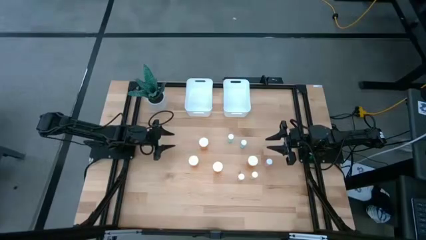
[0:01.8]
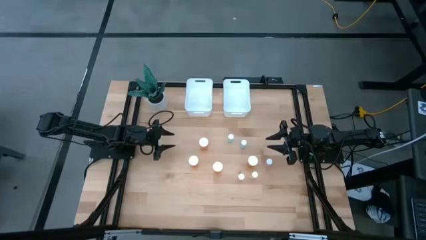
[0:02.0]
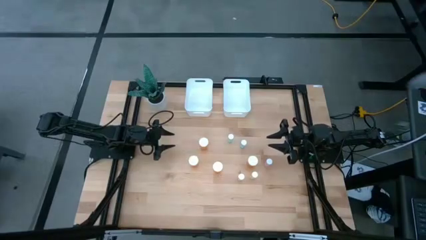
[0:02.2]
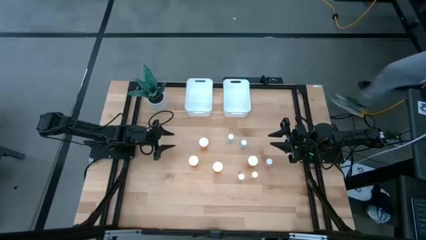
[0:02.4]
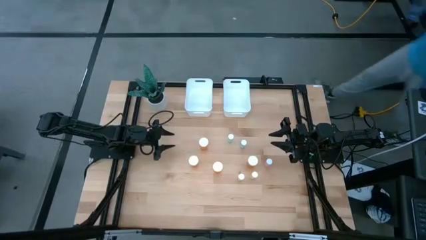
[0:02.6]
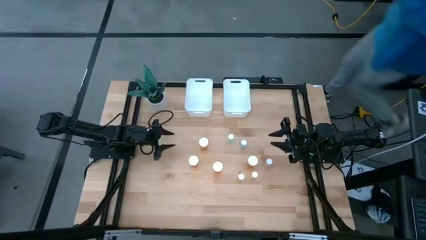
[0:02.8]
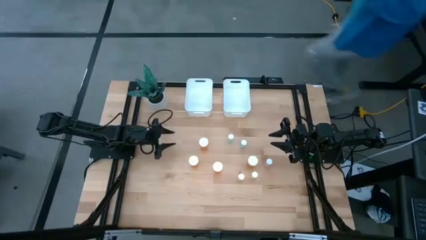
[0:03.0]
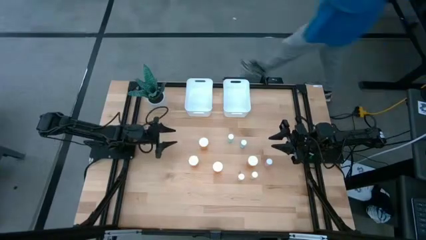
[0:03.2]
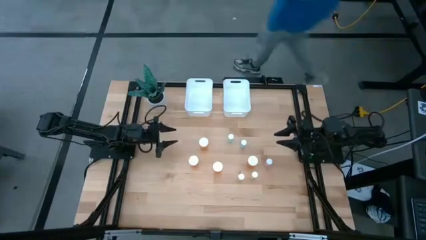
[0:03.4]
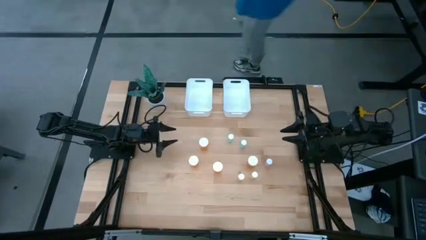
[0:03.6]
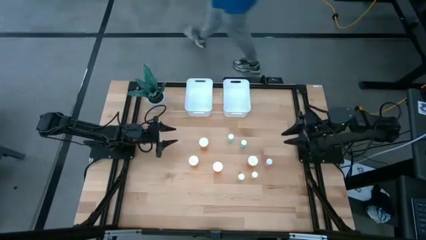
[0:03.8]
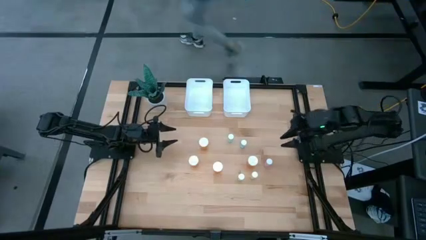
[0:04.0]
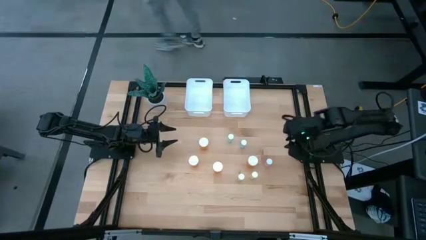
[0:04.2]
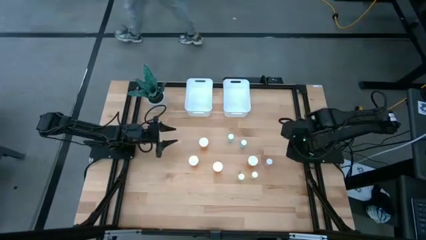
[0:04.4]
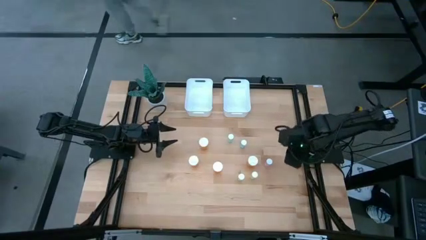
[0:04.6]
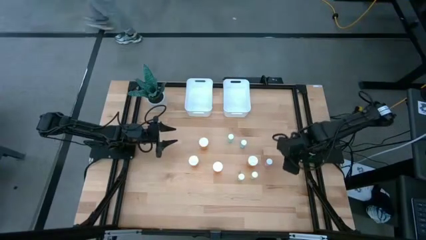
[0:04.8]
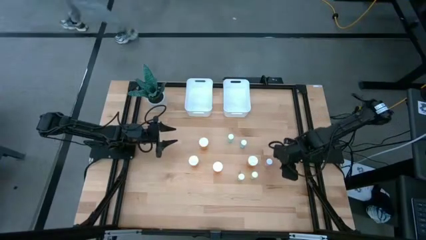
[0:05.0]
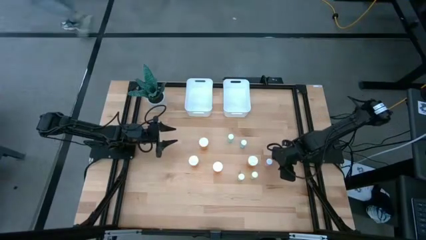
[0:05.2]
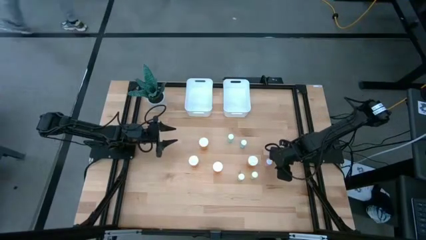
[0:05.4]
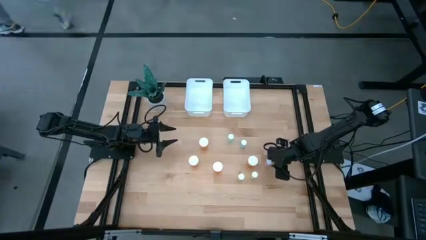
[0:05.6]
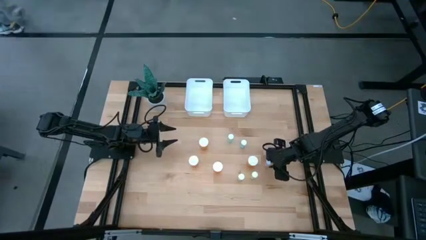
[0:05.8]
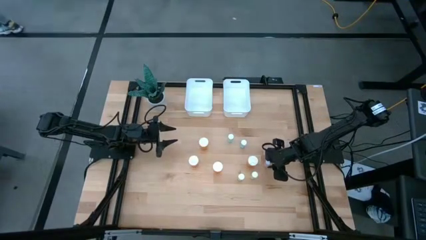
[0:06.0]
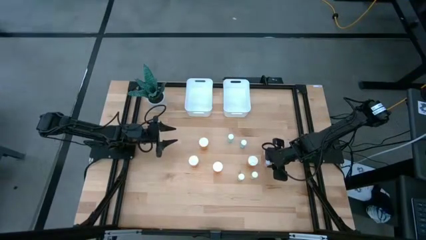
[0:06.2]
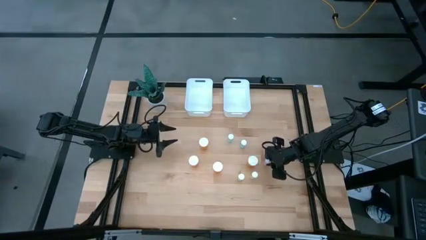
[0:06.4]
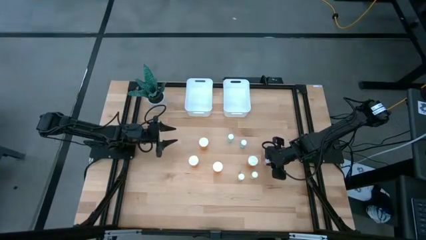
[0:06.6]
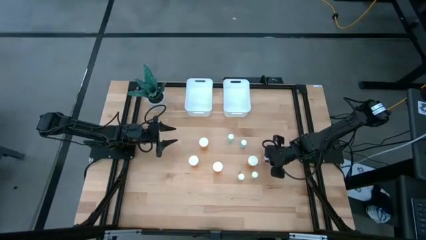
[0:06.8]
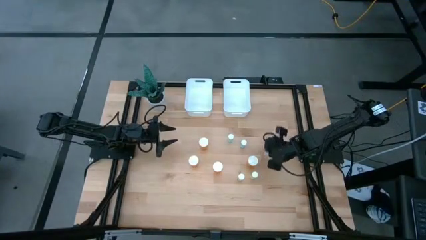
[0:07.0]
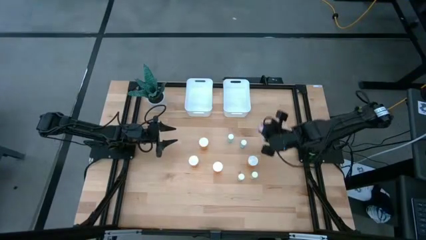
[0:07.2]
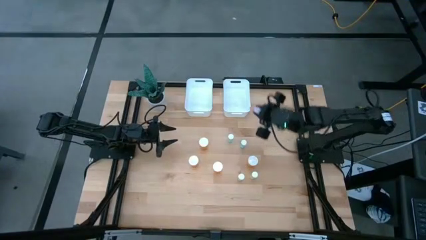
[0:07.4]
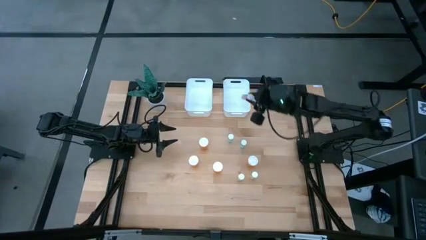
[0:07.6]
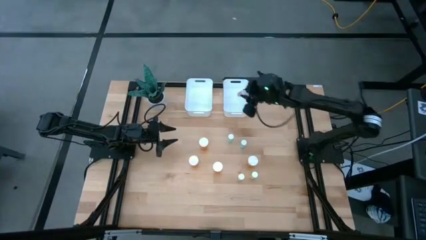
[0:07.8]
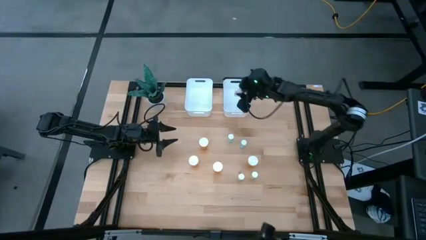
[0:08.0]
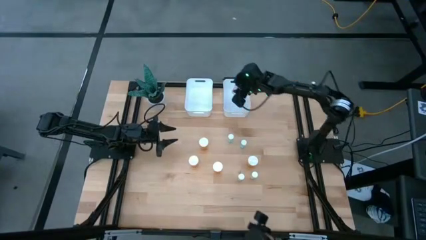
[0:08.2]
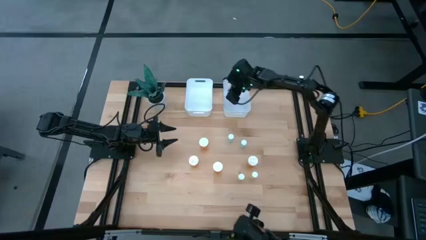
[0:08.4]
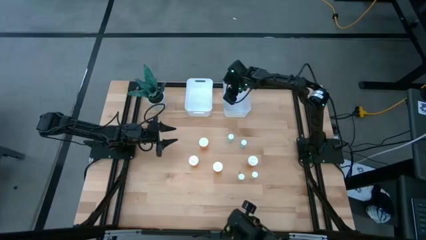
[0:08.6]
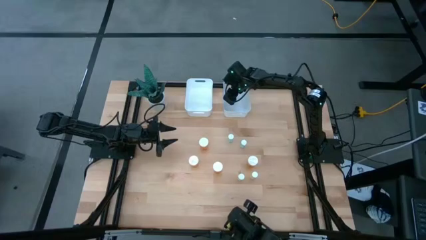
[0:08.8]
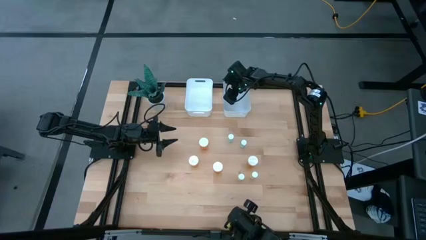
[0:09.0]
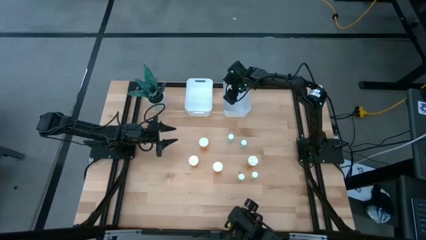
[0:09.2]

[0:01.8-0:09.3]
Task: Pick and place medicine bottles into bin by pill shape (circle, oval)
Put the small pink pill bottle into the right white bin

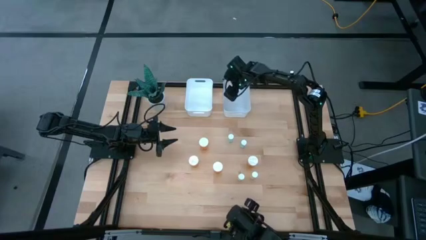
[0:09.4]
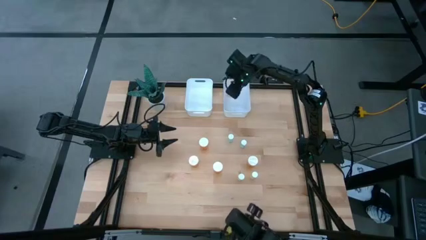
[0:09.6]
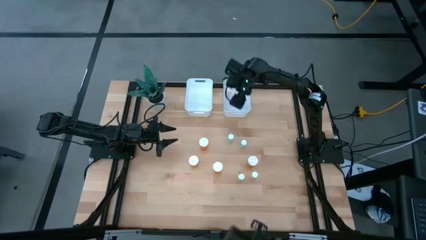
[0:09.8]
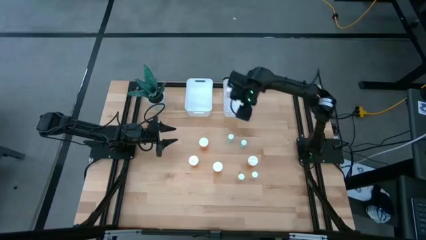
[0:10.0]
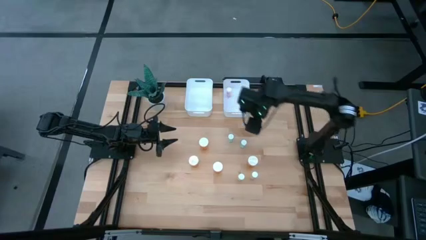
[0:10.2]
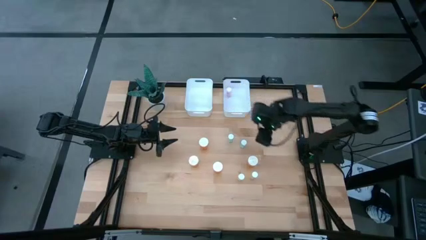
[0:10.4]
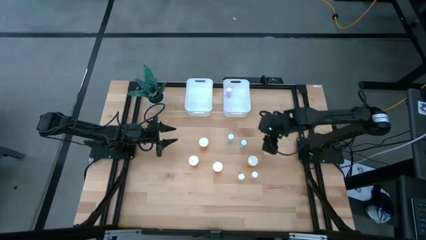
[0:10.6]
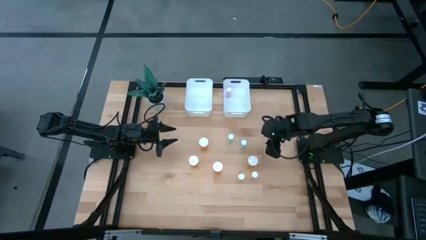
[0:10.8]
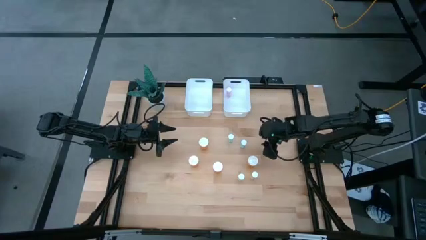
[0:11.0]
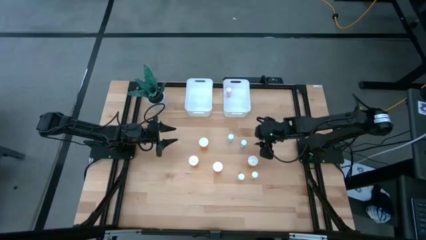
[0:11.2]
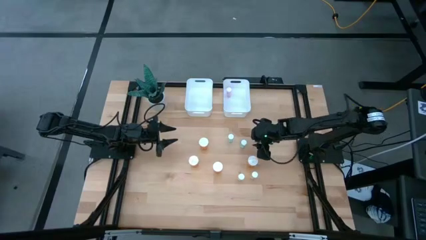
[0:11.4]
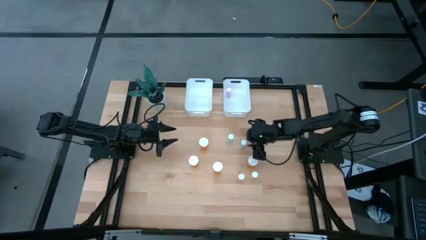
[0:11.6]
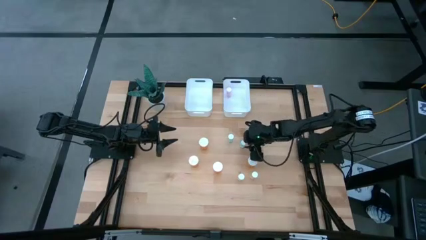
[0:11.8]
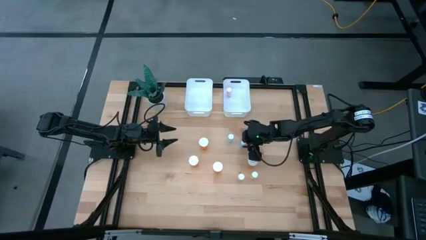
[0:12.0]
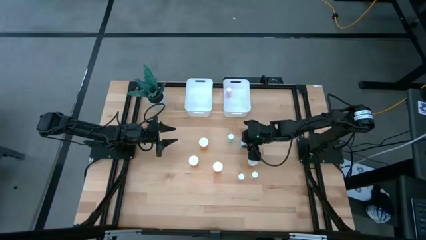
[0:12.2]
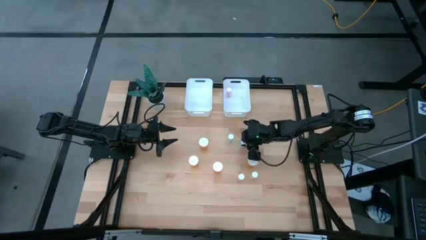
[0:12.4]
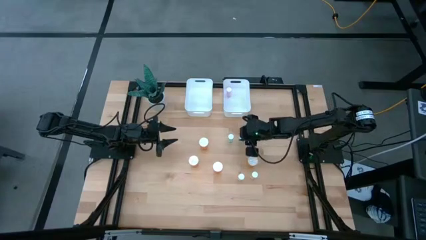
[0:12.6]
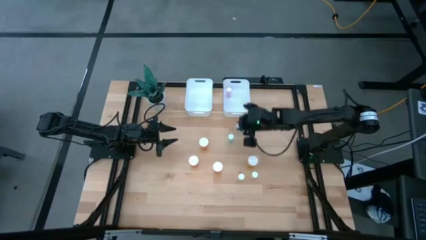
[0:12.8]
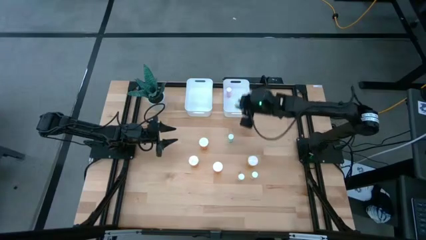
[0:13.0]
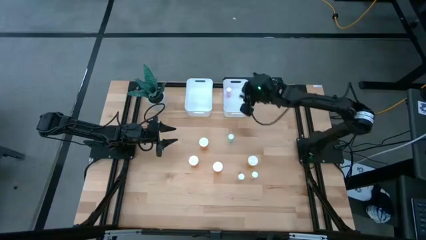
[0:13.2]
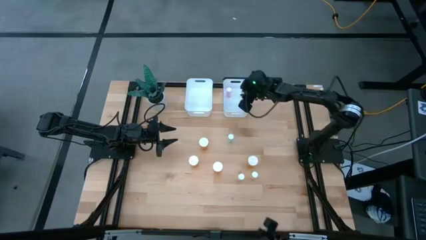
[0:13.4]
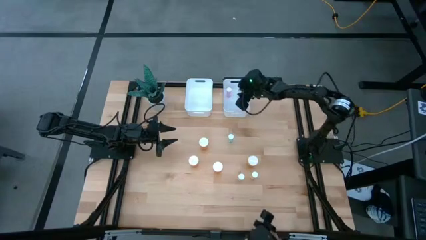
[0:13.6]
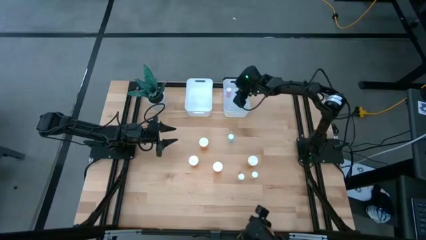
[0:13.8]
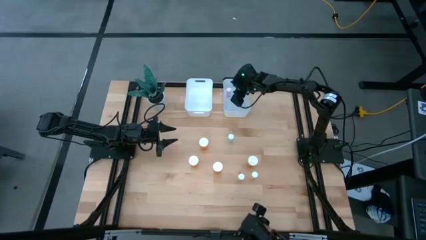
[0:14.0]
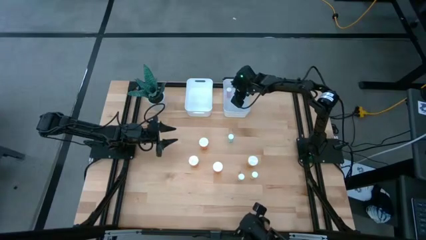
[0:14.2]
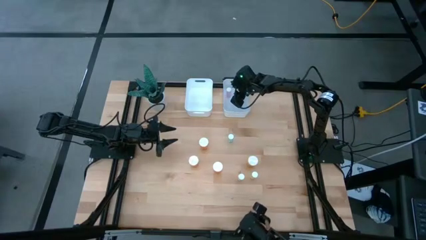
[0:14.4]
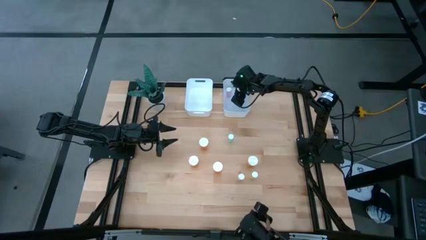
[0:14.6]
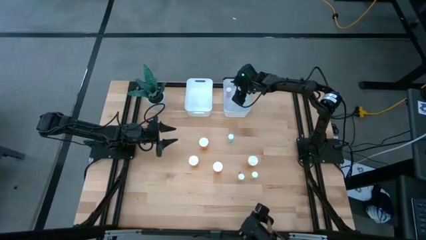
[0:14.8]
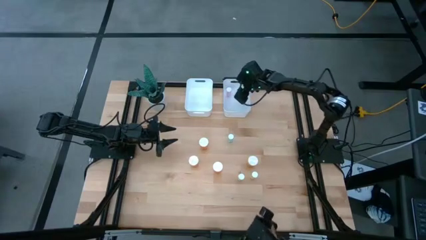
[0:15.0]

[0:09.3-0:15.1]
Put the small blue pill bottle into the right white bin

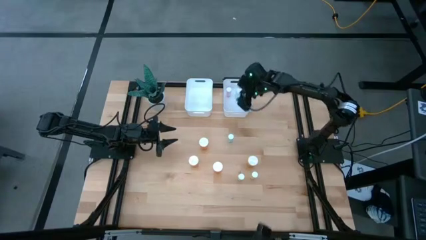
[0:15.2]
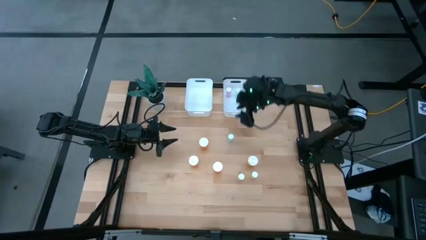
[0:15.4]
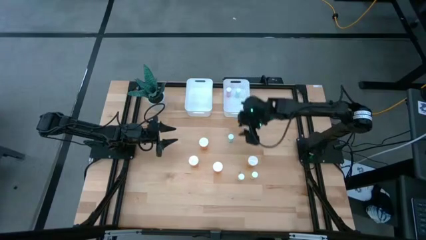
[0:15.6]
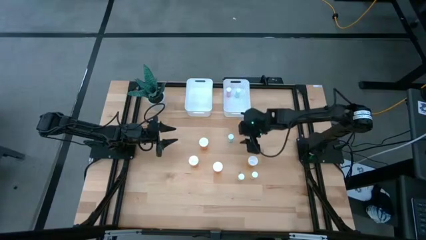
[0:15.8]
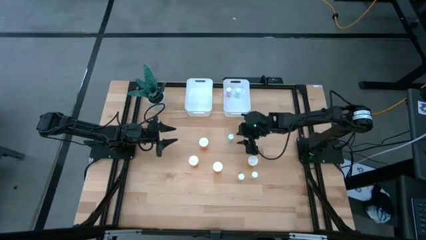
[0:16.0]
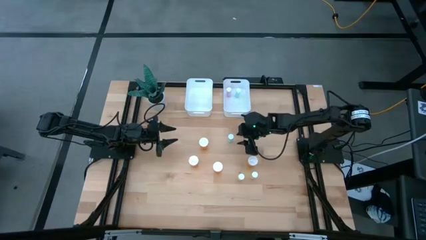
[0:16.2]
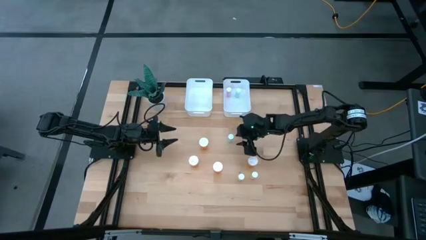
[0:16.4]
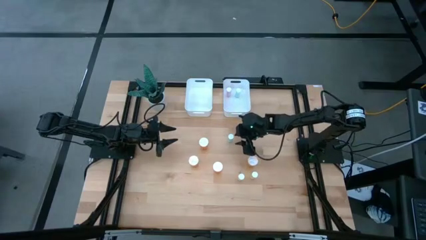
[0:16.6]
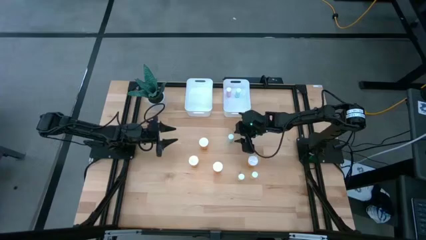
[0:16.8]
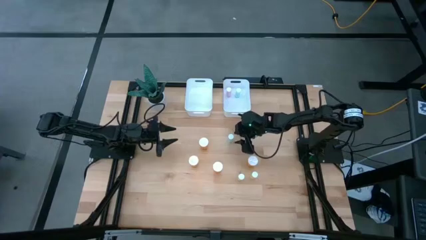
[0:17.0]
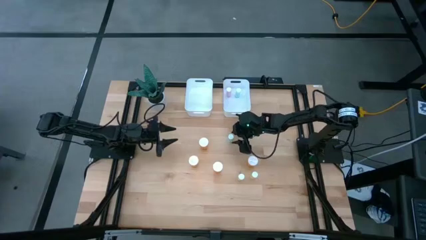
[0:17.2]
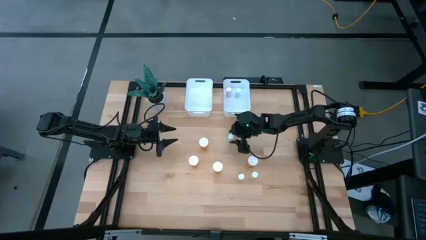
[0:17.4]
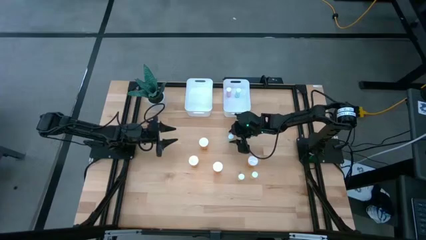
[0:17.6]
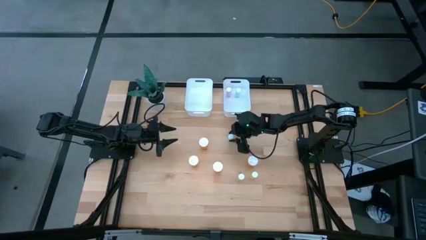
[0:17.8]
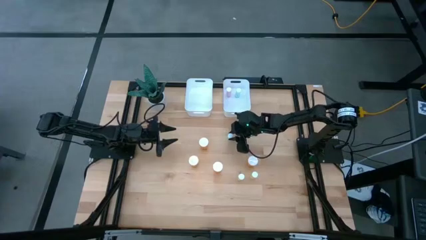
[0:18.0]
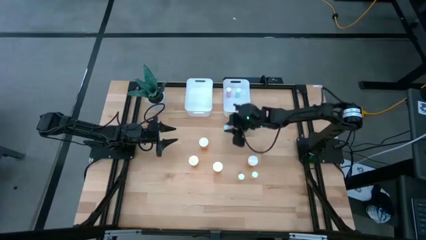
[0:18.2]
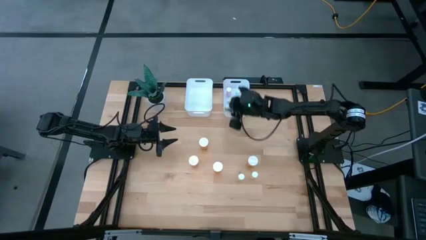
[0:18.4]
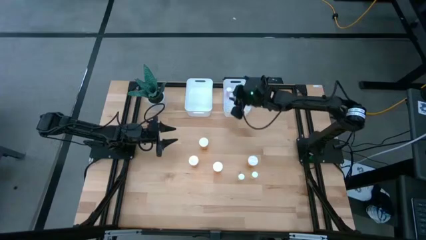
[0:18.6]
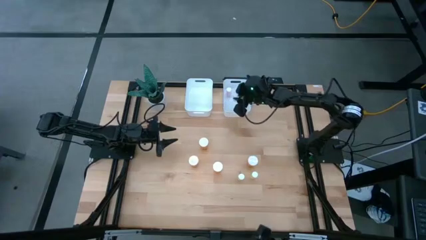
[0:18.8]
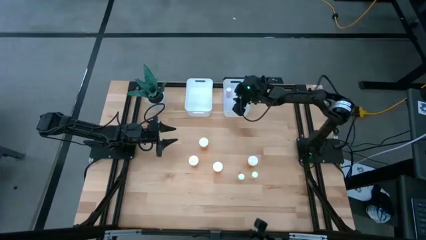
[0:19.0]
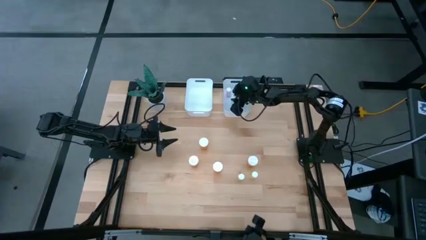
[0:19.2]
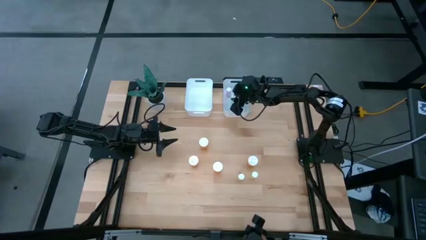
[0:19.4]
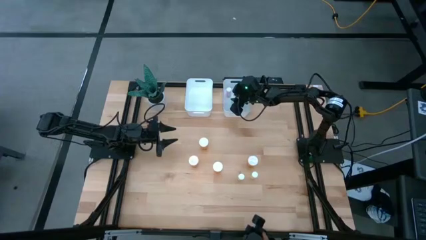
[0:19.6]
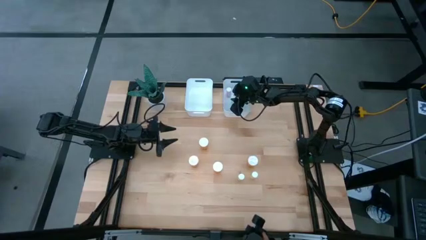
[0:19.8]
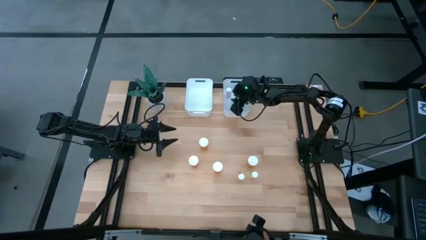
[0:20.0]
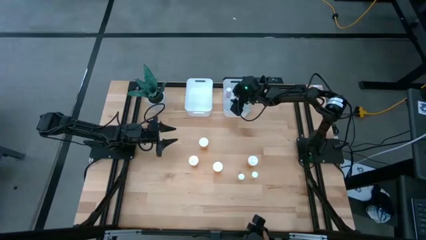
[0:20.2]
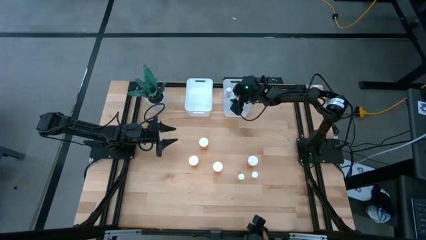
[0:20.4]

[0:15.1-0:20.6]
Put the small blue pill bottle into the right white bin
